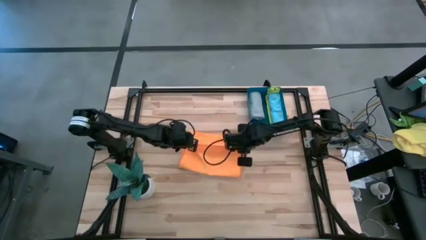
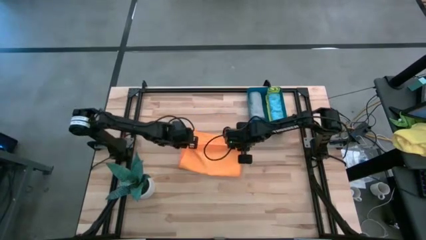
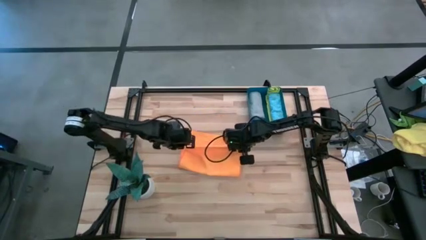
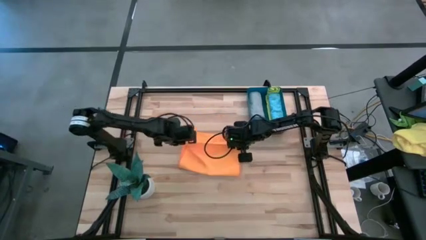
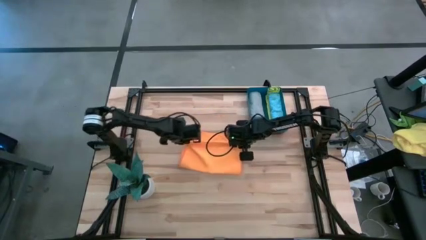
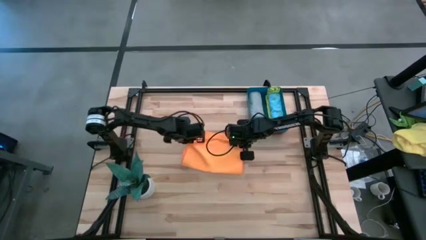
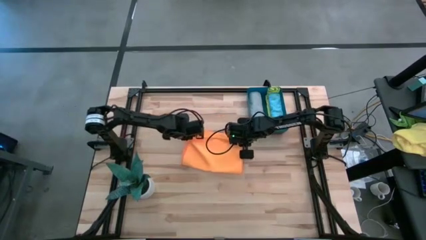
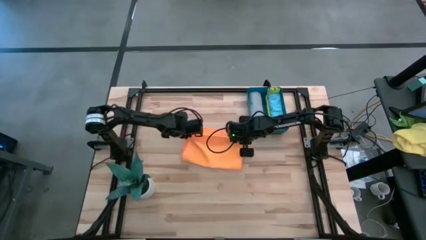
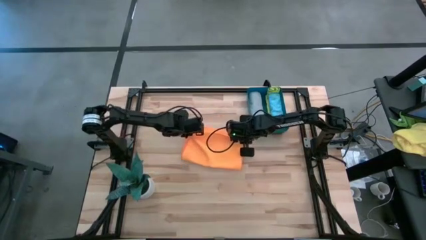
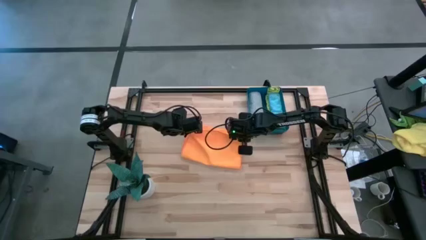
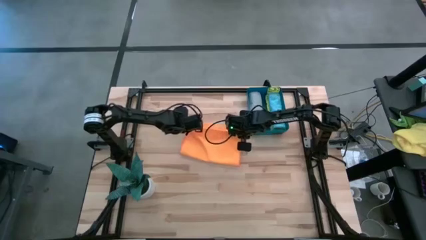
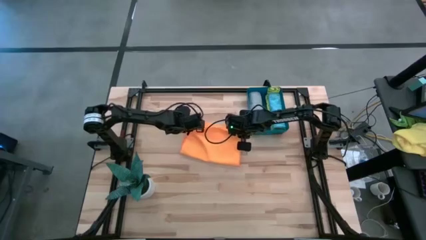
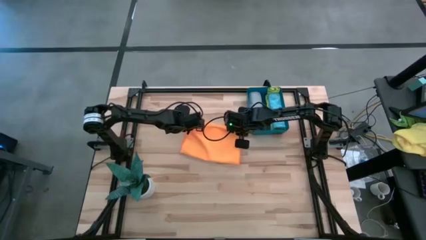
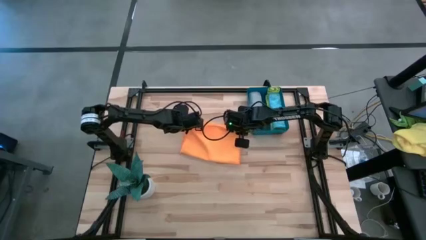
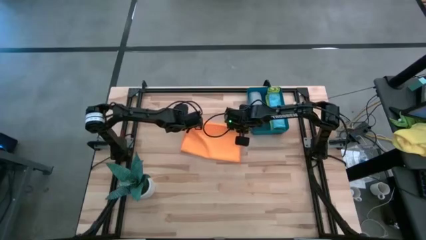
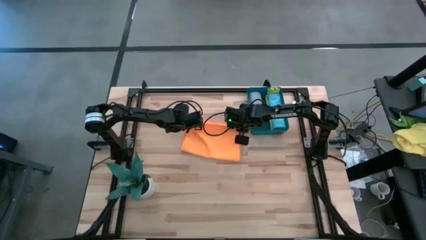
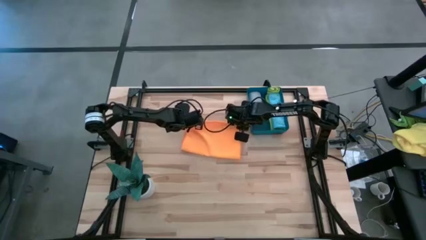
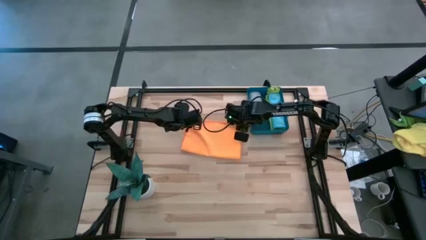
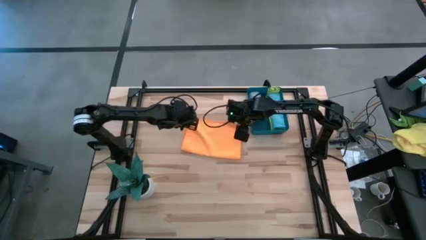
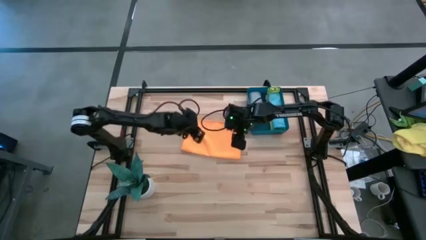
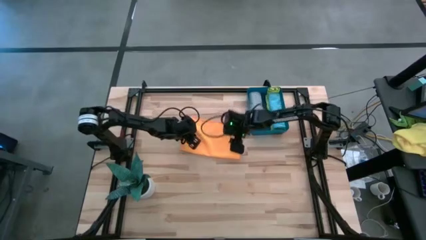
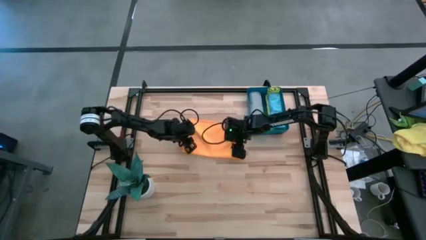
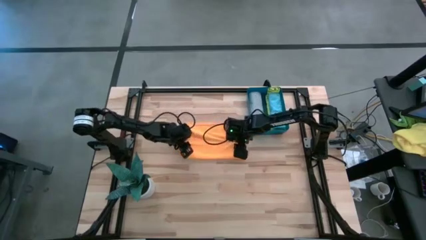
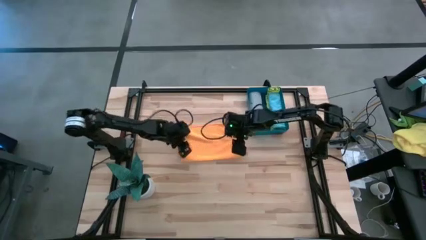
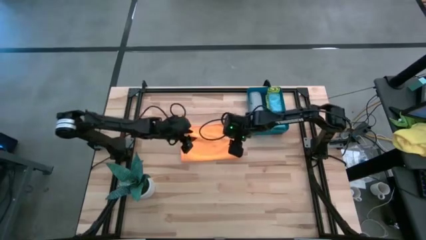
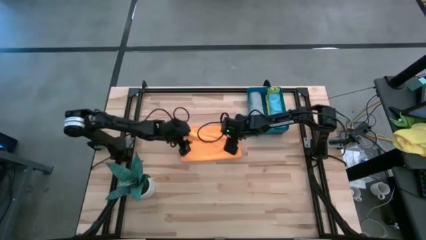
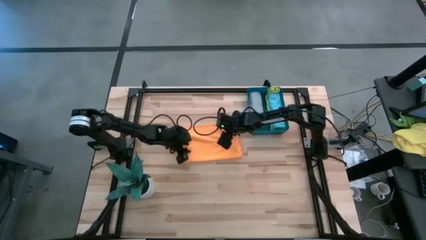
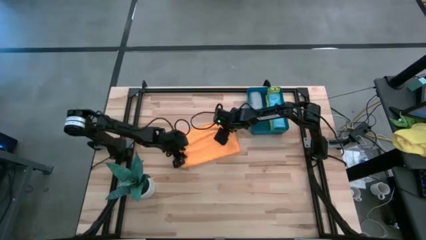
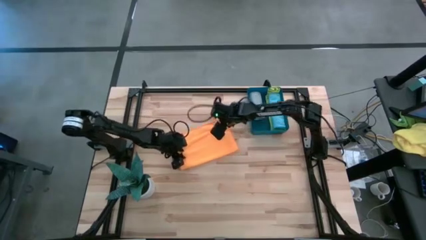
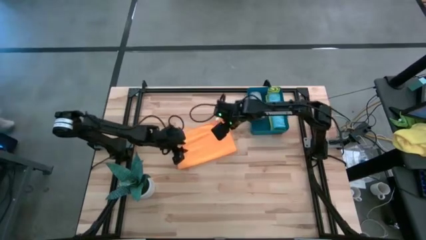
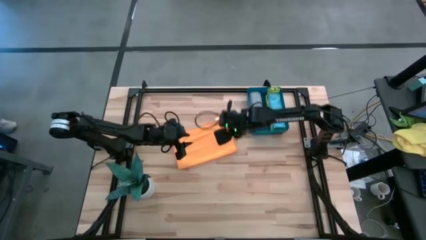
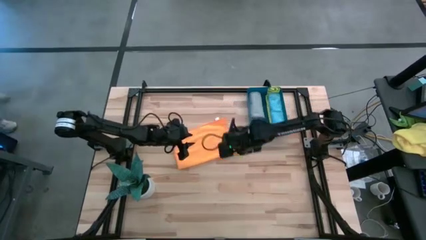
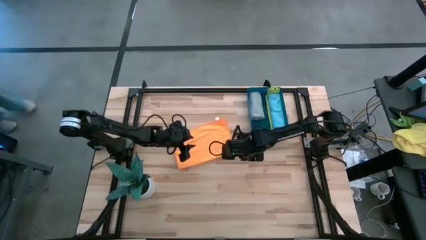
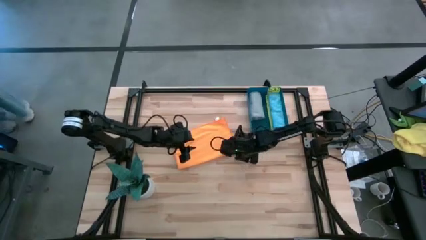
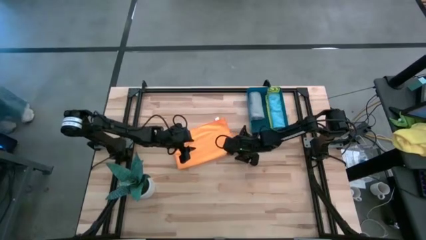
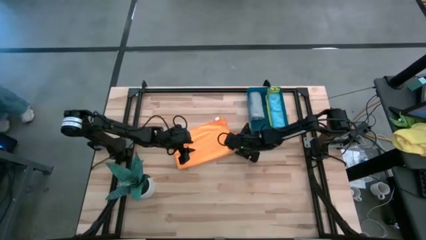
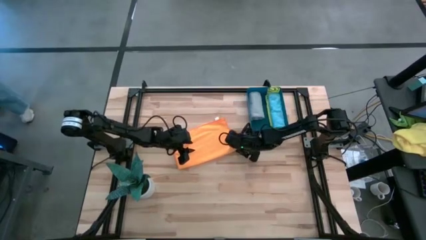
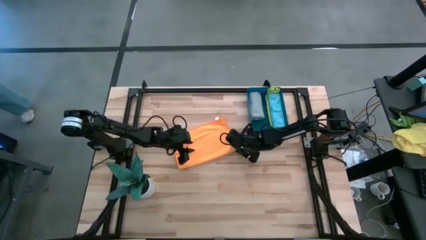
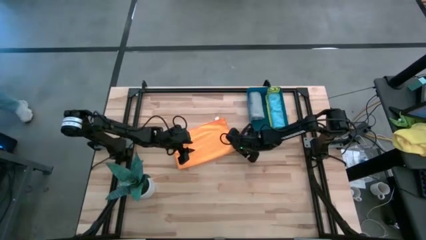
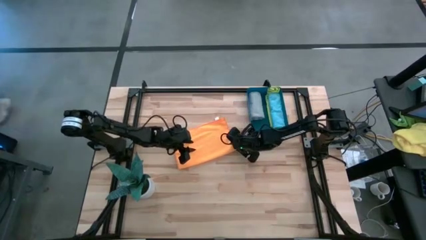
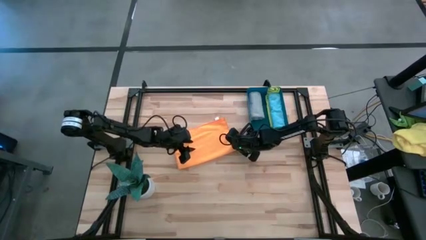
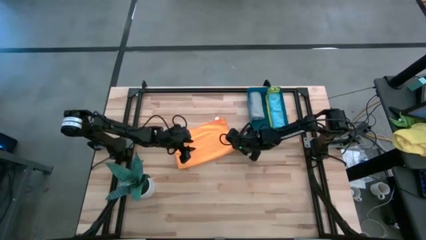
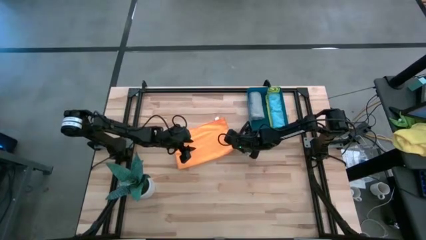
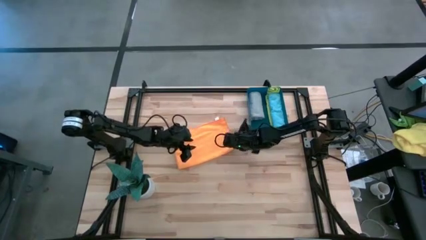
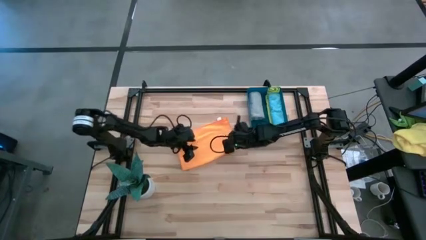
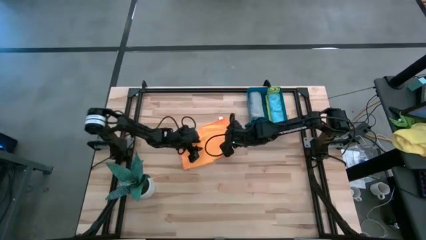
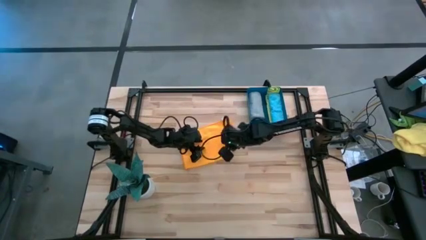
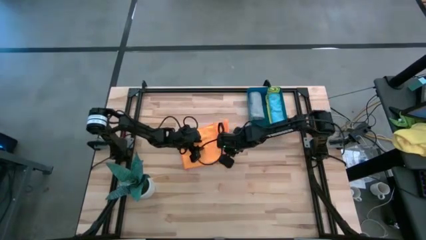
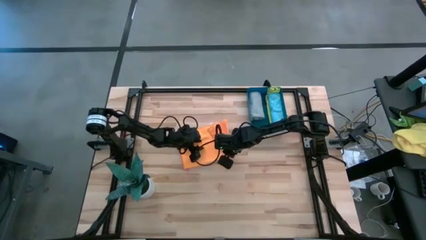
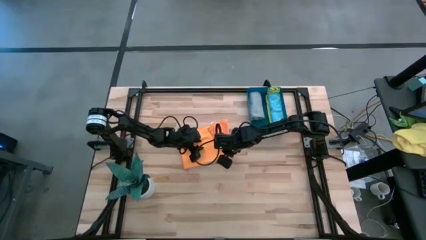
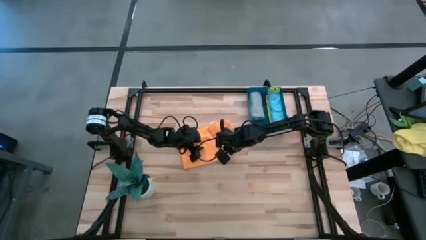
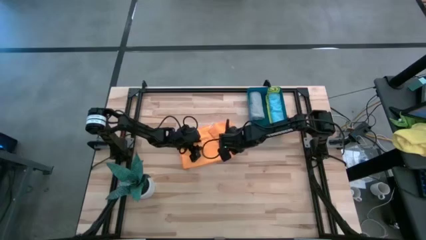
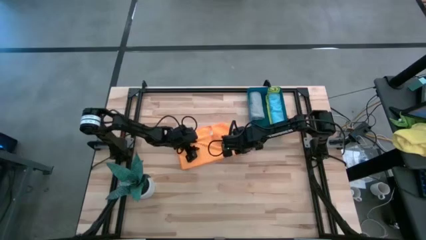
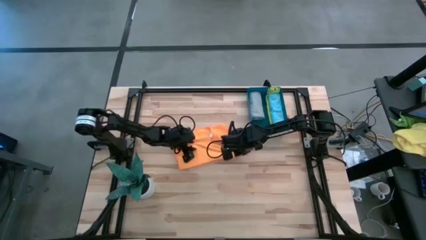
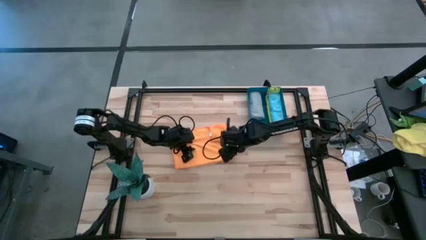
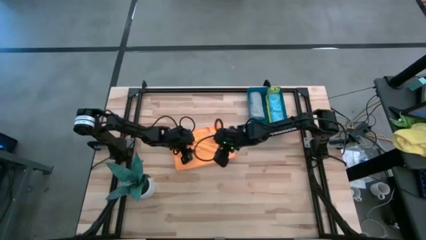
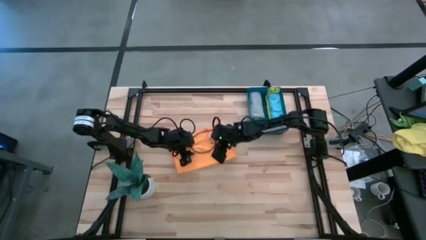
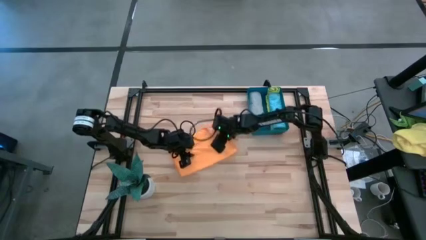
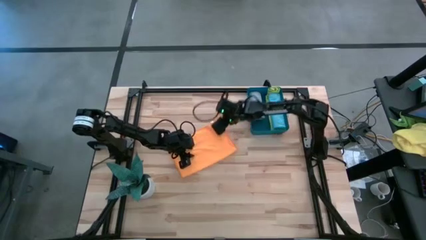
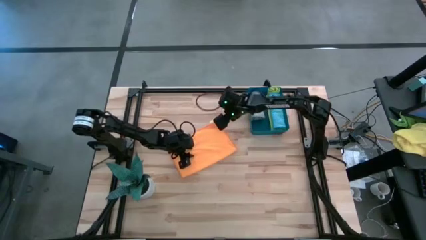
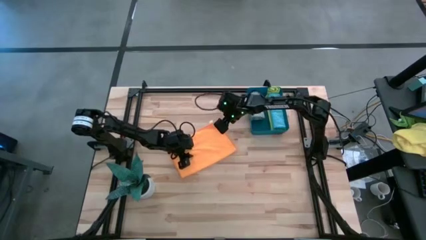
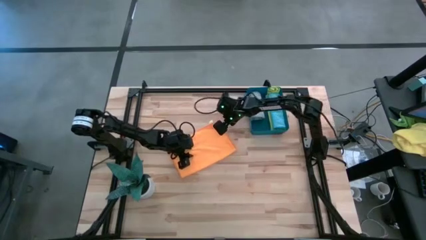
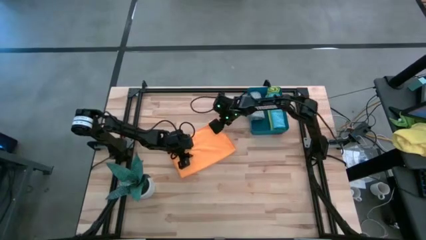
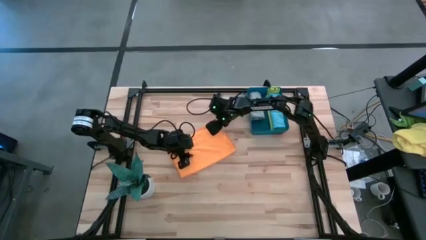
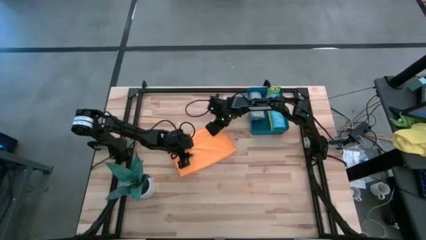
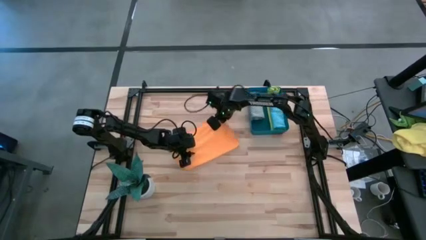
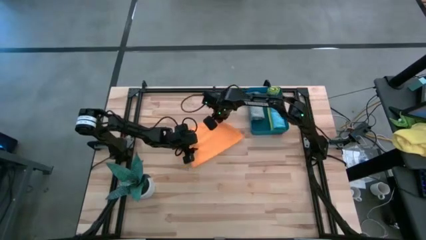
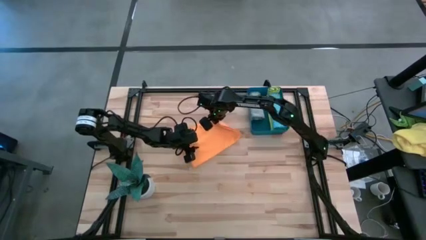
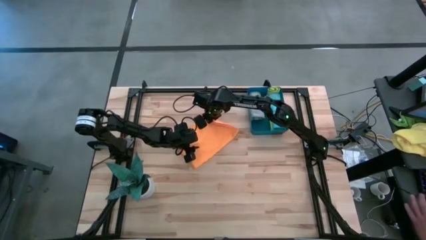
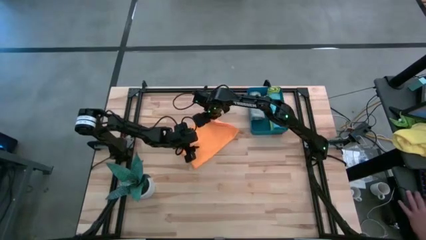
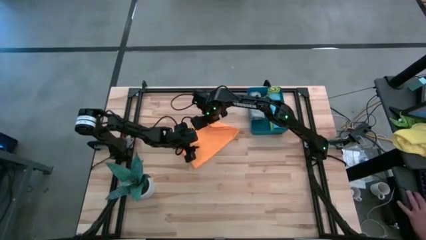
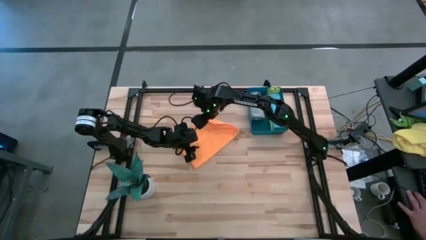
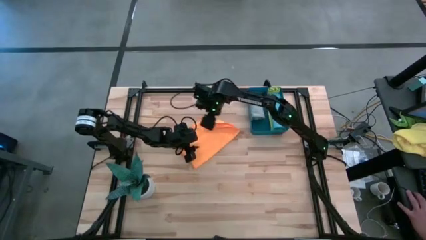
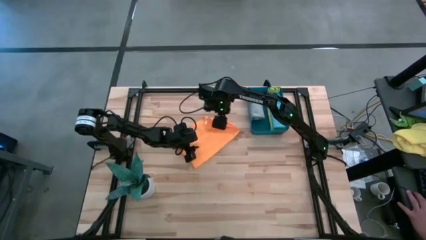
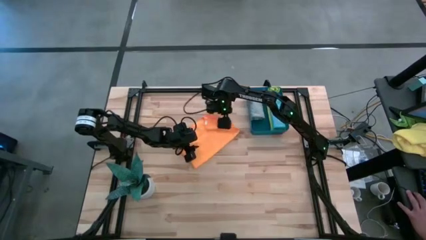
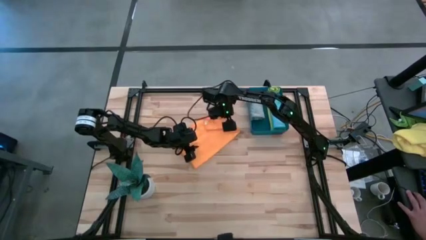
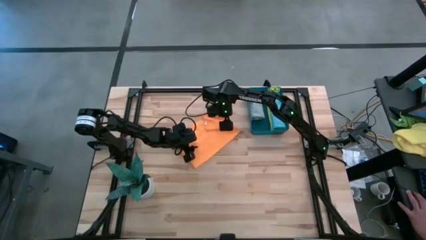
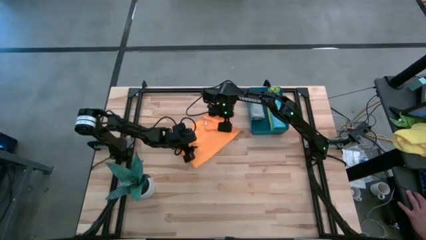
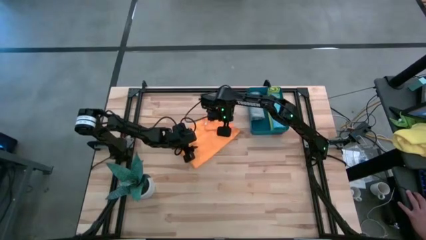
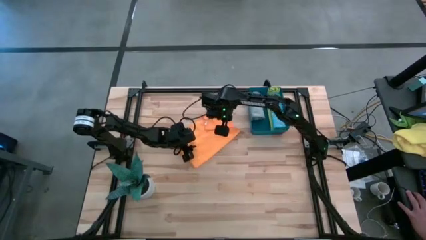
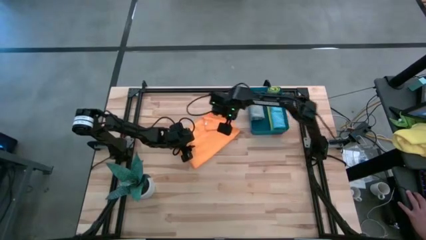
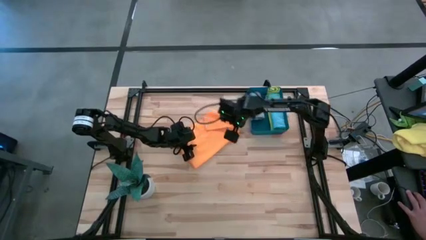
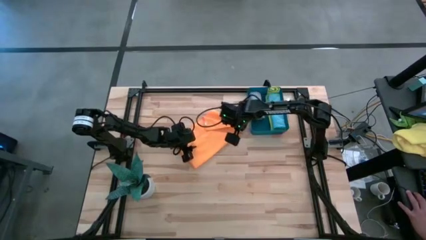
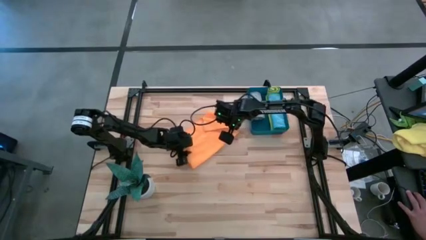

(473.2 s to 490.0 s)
Task: Roll microfiber towels into tight, uniform cylinder then place into a basket
Roll the orange towel
